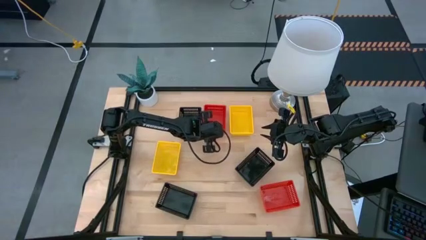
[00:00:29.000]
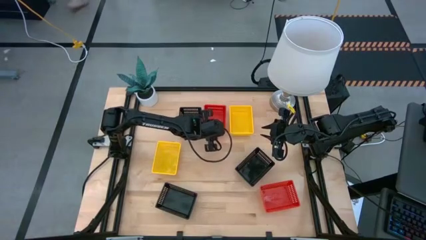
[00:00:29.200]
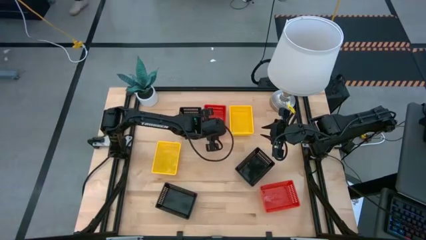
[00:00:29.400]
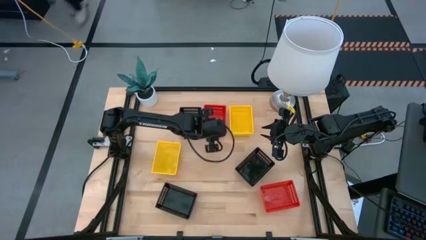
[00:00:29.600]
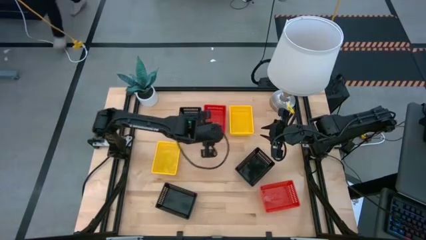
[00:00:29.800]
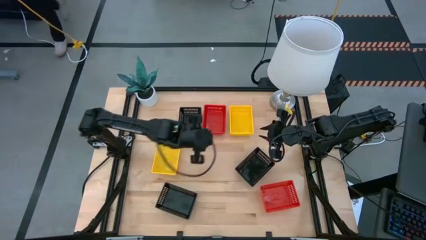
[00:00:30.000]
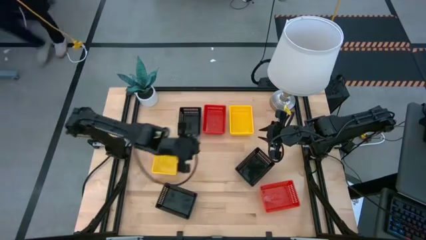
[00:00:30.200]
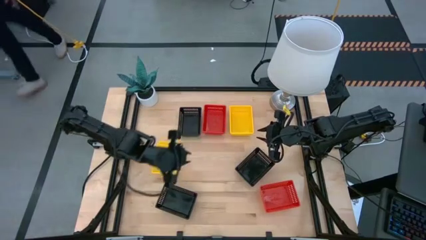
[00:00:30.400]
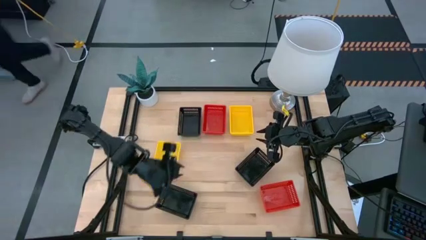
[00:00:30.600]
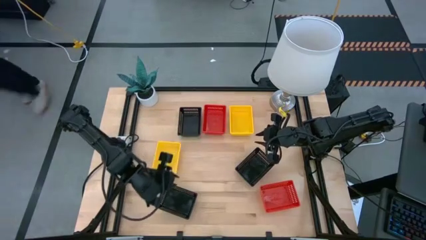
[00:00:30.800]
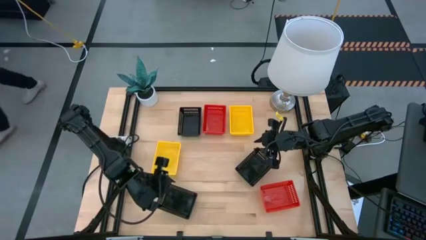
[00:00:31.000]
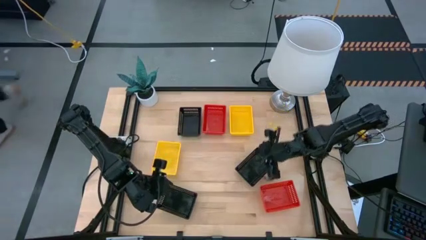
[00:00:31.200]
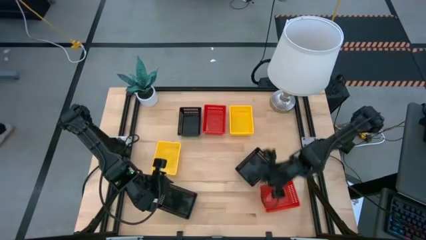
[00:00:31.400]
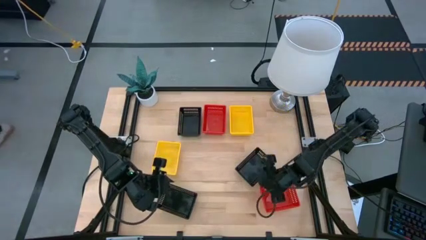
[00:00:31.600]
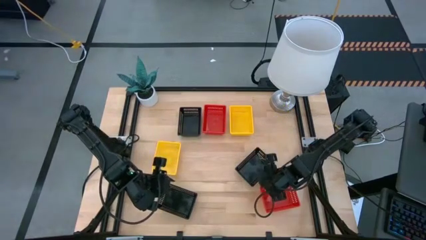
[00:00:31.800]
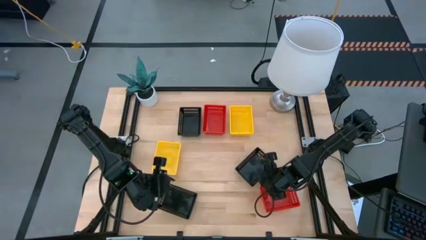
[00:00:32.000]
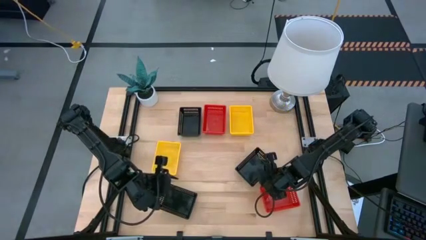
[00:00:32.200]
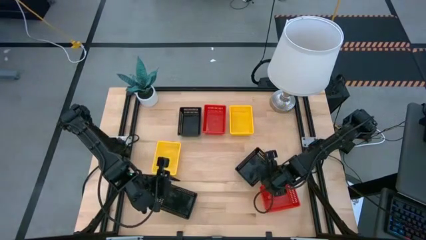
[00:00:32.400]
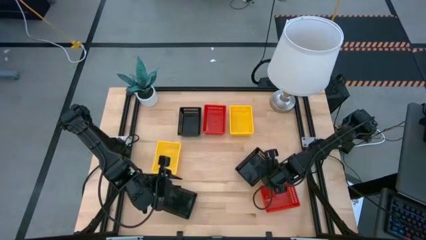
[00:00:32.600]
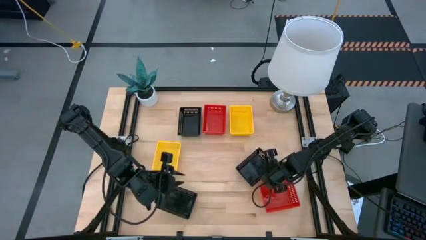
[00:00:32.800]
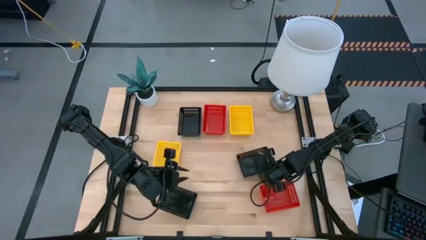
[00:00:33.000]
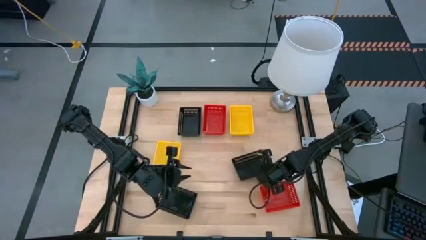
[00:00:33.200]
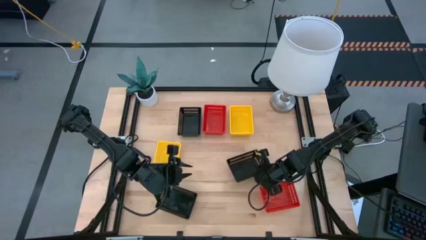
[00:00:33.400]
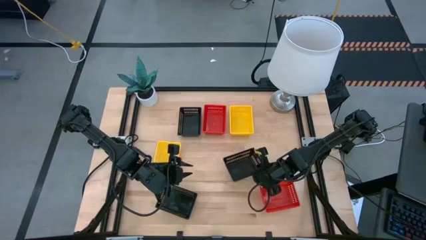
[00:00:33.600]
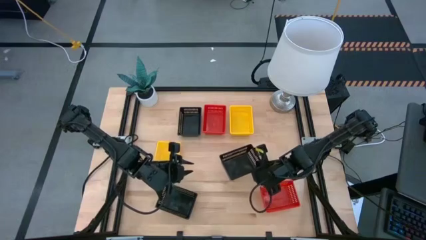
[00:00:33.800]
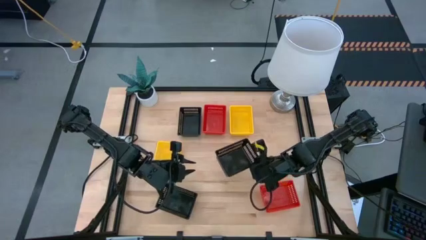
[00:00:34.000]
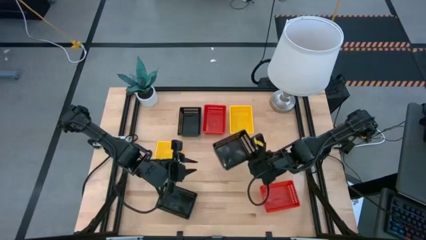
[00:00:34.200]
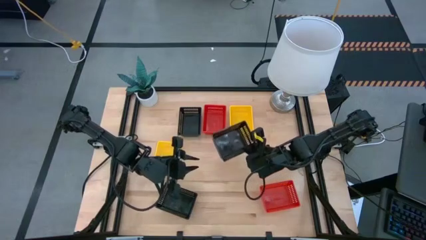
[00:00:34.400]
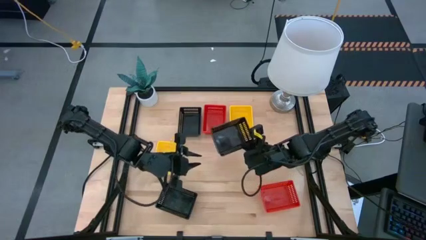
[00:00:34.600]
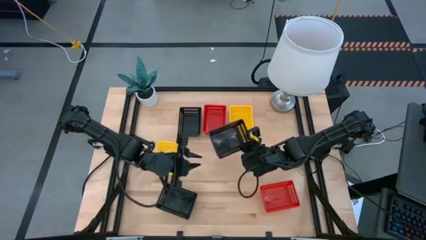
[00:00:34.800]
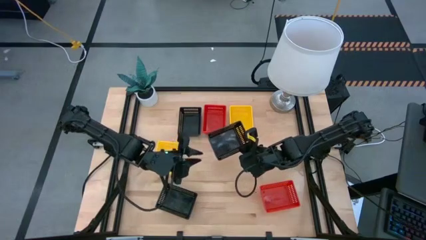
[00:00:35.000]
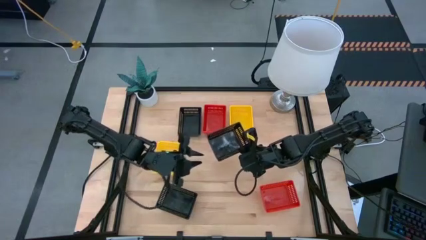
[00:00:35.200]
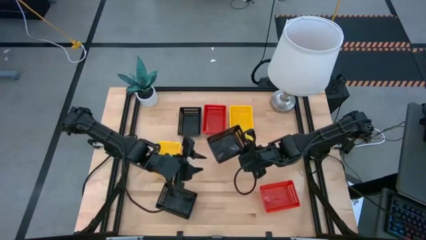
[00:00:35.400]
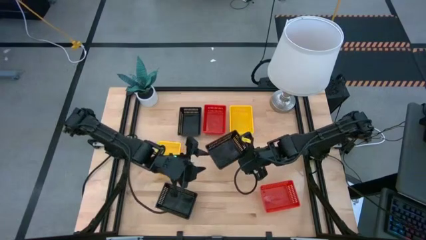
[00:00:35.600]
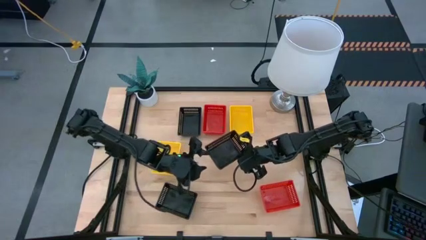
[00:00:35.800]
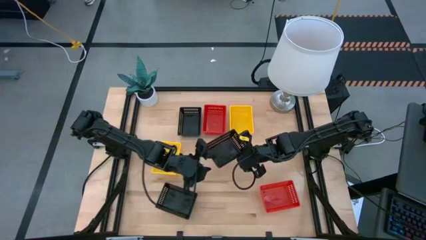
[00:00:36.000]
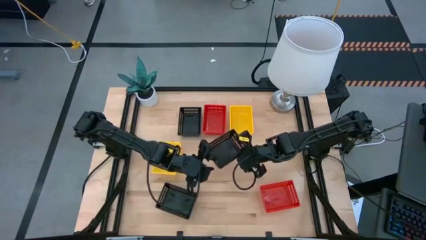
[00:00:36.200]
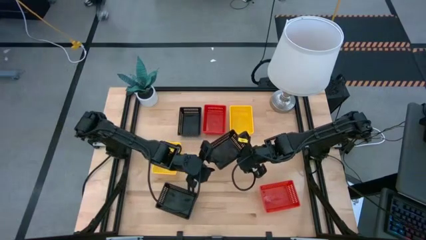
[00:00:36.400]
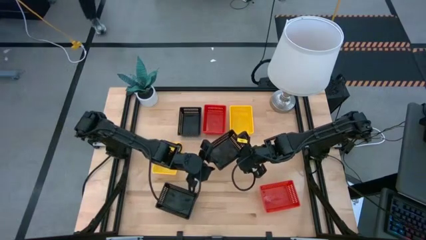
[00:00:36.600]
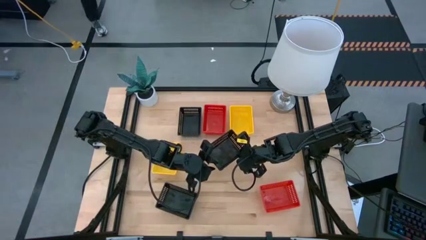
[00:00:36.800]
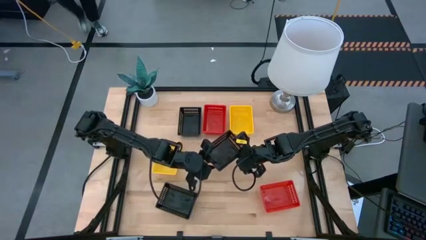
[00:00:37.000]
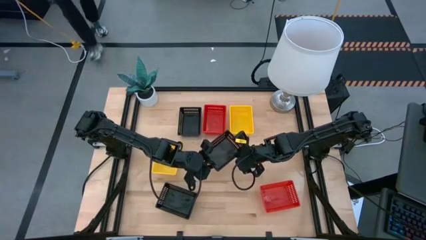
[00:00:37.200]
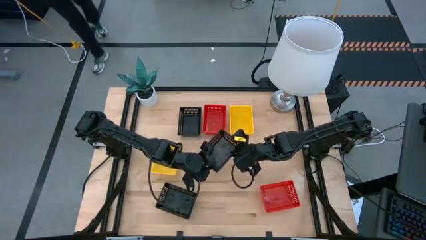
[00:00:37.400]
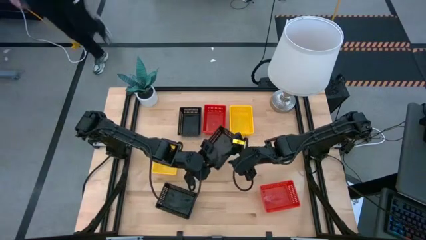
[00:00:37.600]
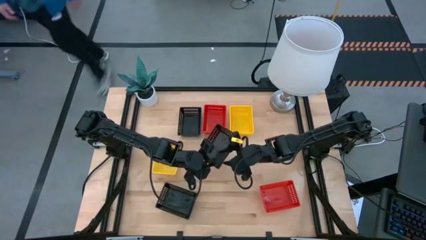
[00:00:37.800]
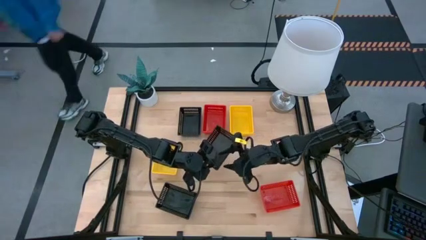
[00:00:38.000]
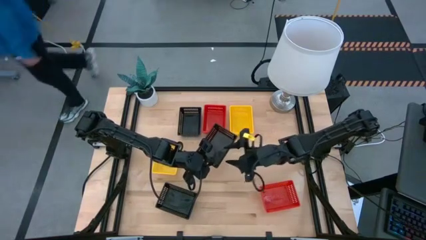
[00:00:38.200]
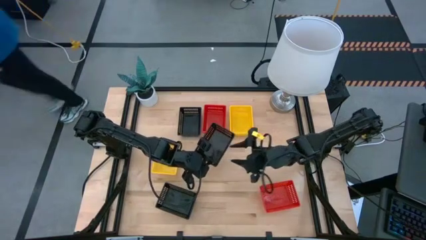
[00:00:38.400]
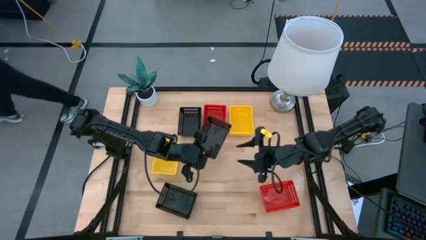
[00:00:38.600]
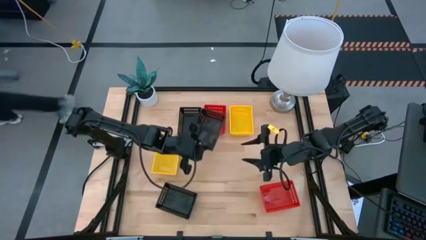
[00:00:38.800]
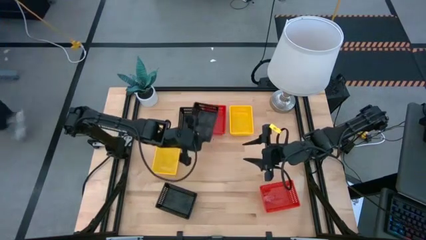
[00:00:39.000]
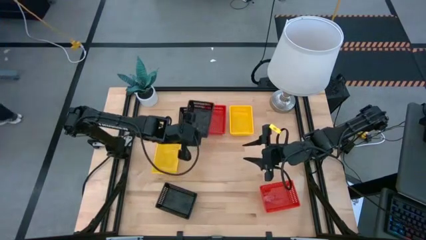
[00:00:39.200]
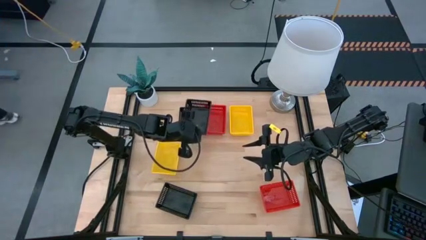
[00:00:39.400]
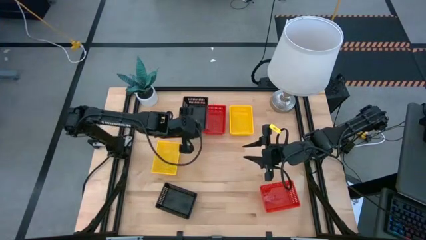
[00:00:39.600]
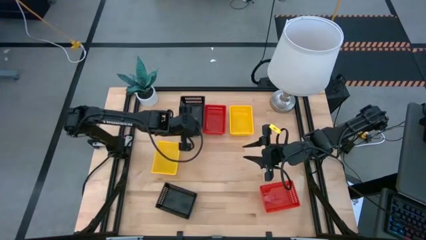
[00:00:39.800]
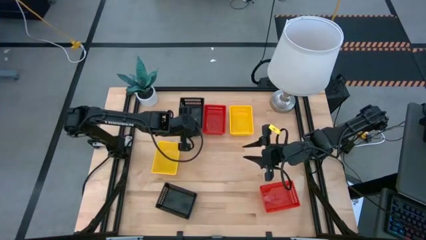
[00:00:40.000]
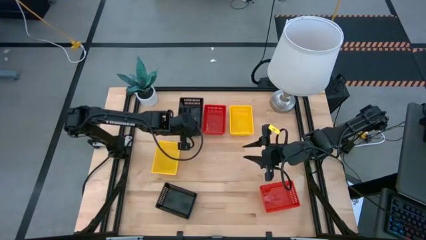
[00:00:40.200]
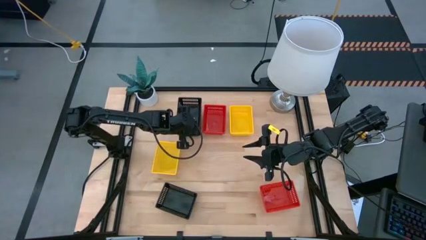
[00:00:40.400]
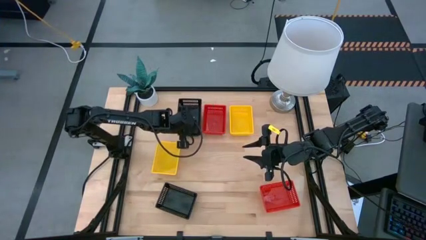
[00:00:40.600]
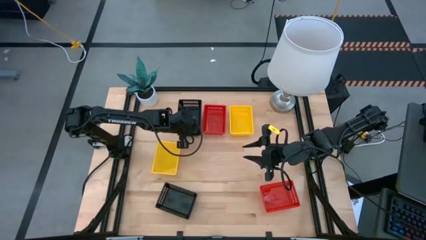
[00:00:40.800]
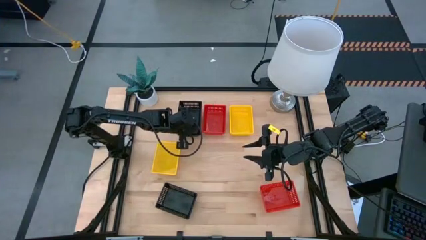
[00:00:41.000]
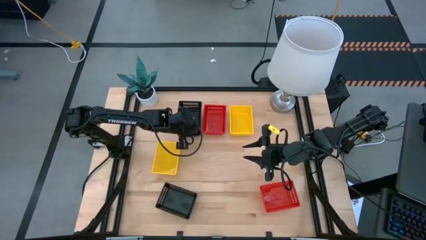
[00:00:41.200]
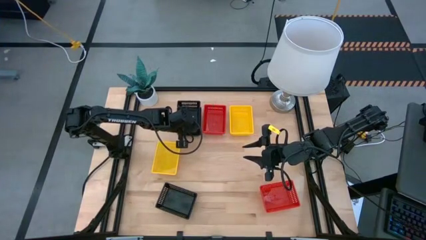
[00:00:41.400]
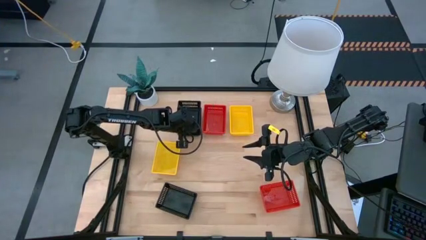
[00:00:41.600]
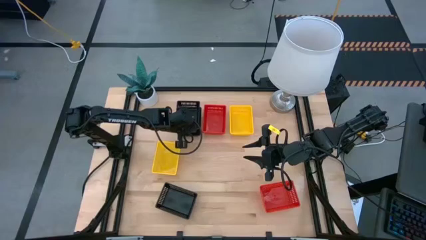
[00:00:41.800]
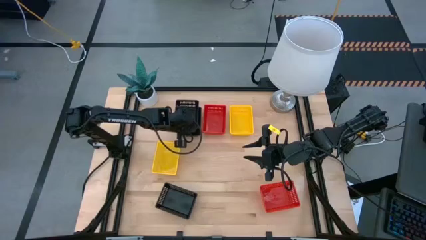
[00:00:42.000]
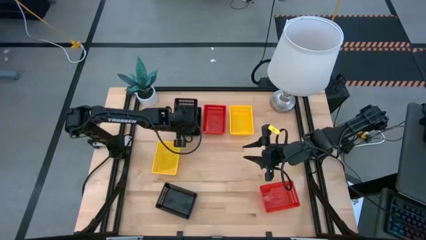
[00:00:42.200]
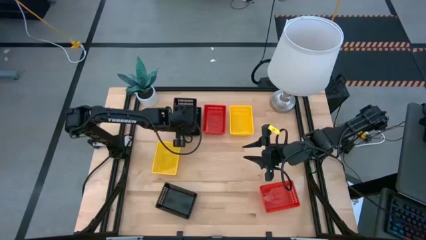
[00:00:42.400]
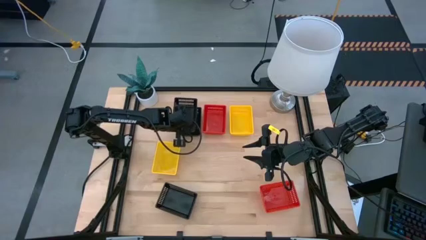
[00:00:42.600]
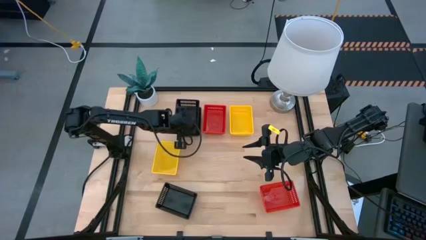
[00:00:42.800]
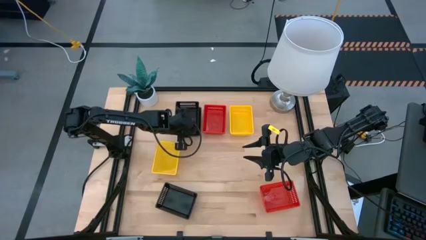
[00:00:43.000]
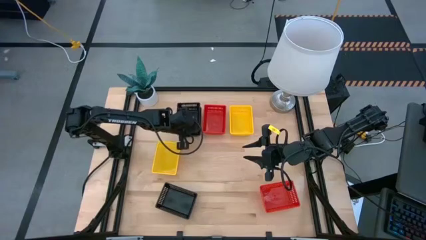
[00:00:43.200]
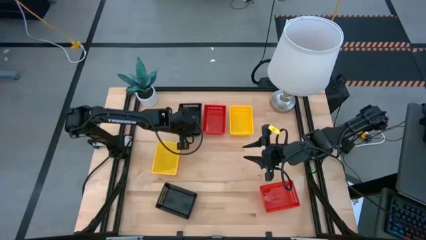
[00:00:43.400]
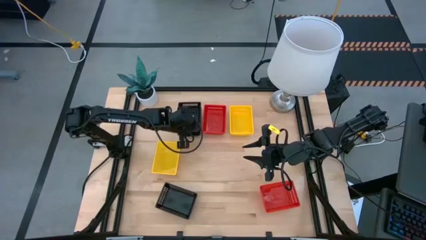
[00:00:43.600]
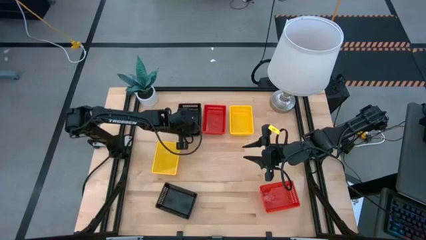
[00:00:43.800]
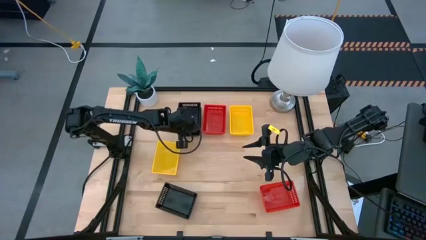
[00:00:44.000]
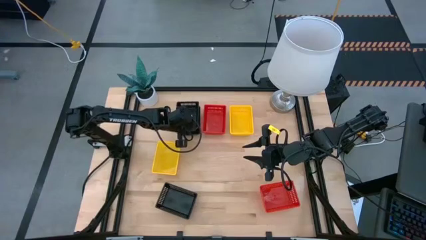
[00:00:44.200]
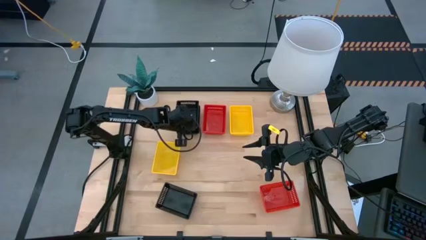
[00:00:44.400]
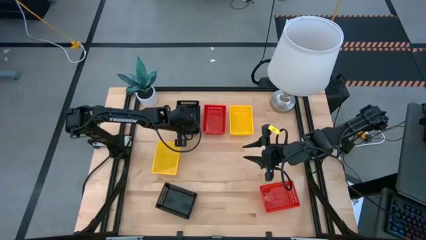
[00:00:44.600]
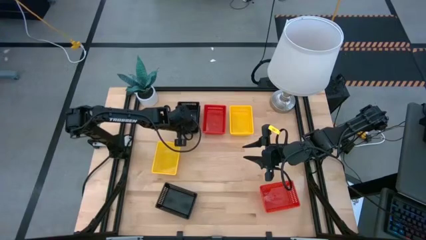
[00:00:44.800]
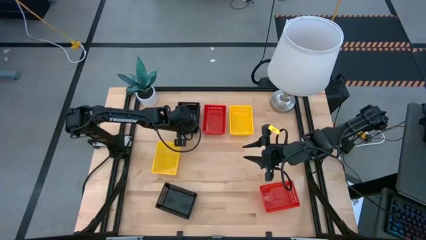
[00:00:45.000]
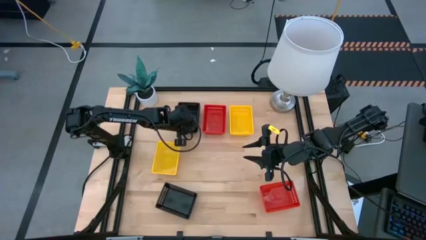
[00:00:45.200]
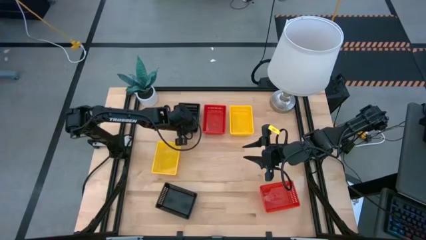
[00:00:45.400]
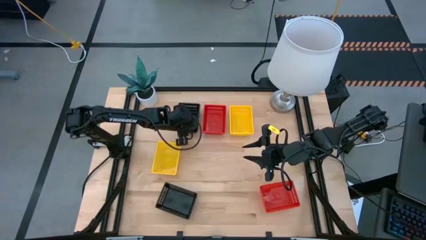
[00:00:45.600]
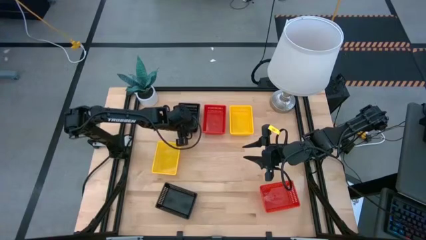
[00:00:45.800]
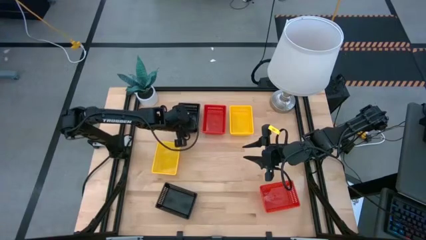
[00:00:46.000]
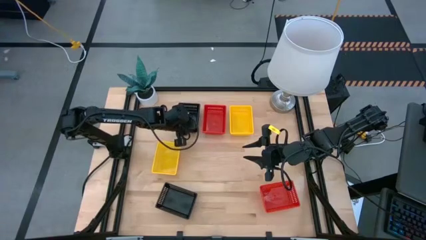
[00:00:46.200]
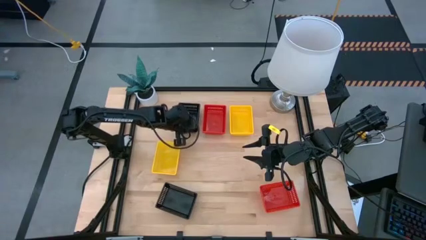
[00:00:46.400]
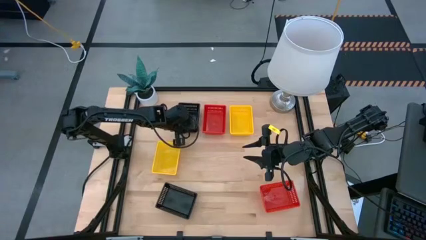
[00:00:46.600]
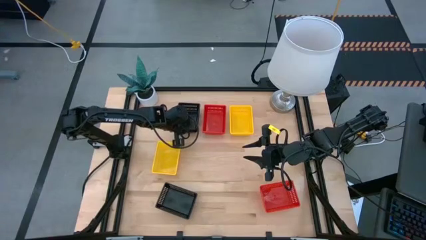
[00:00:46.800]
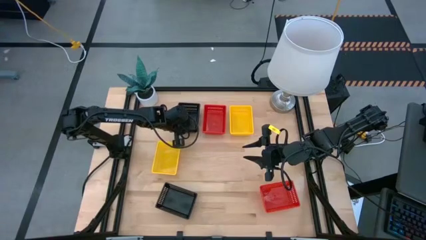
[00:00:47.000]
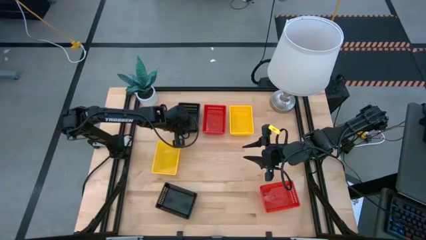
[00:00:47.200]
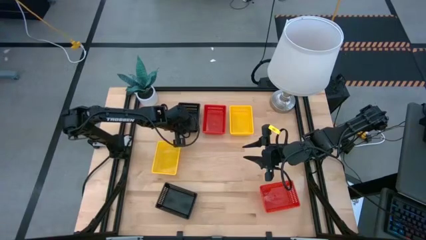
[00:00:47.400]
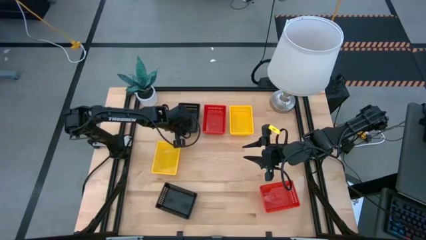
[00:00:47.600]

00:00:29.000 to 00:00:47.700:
Stack the middle right black bin on the top left black bin
